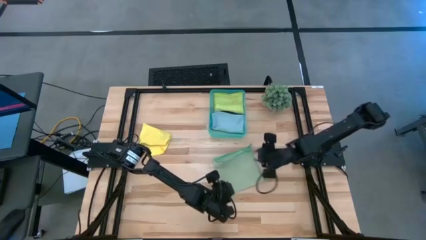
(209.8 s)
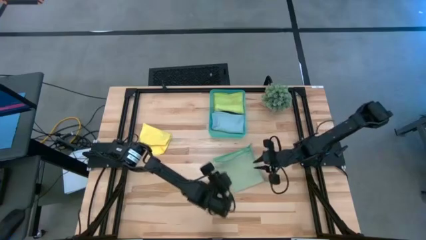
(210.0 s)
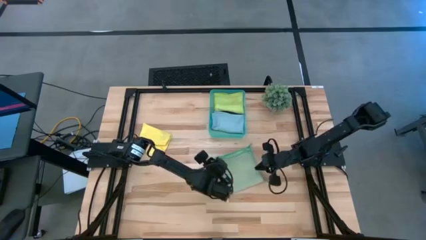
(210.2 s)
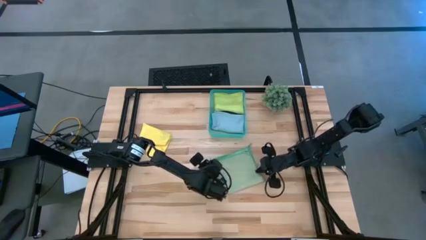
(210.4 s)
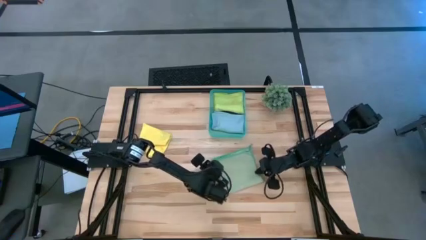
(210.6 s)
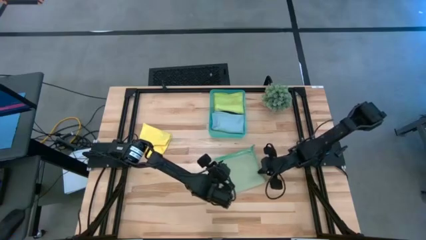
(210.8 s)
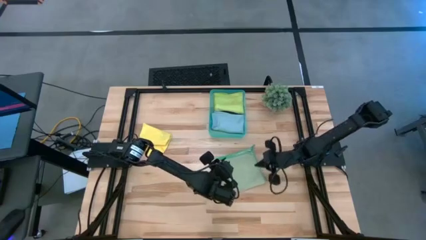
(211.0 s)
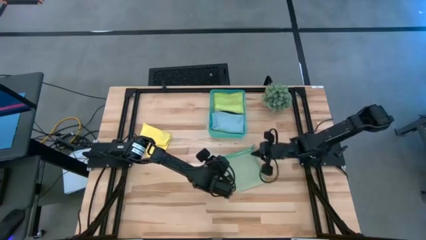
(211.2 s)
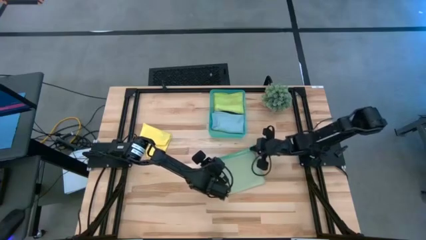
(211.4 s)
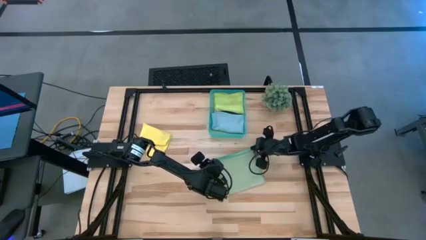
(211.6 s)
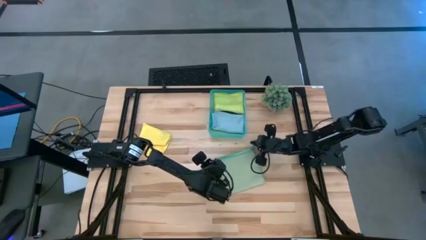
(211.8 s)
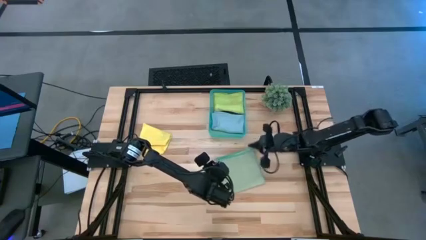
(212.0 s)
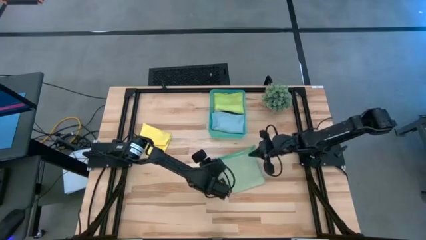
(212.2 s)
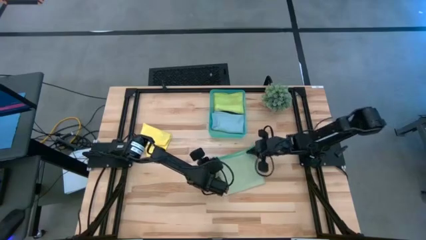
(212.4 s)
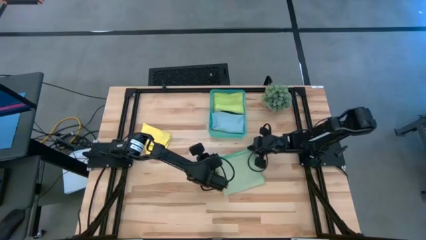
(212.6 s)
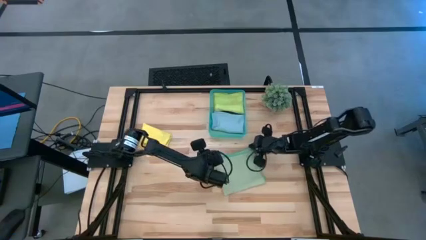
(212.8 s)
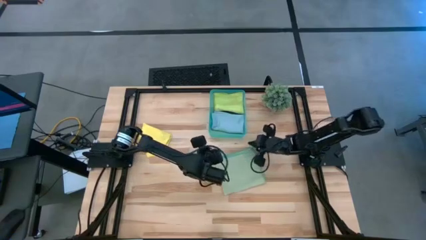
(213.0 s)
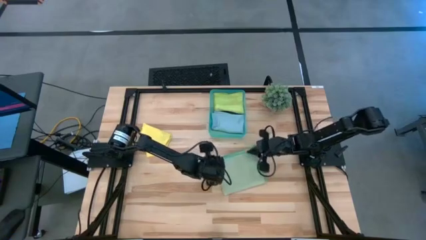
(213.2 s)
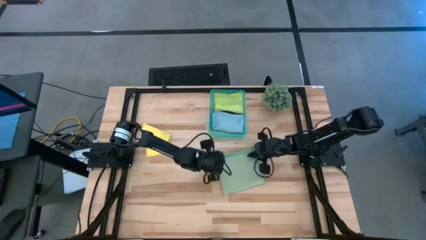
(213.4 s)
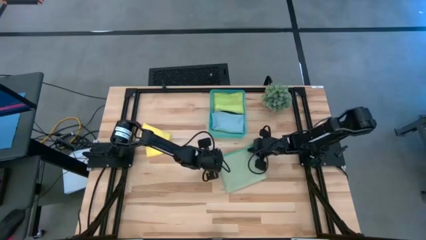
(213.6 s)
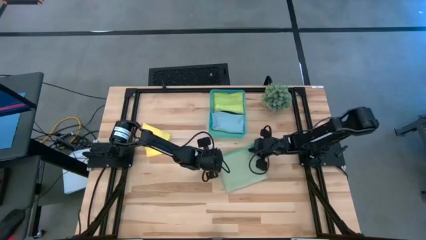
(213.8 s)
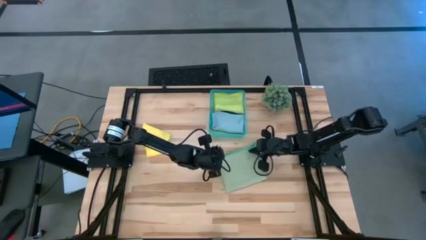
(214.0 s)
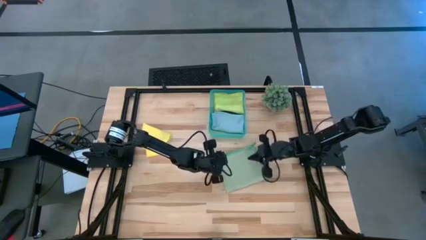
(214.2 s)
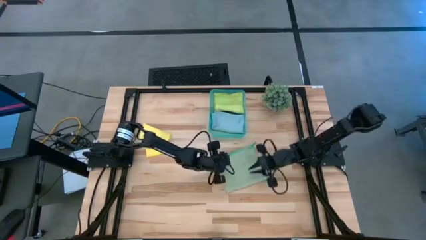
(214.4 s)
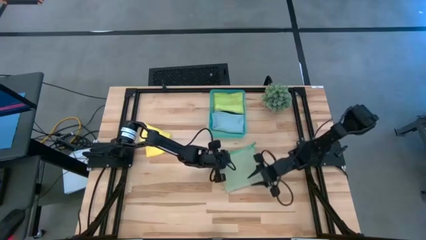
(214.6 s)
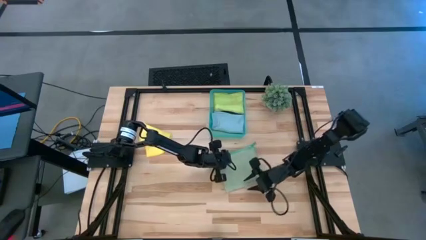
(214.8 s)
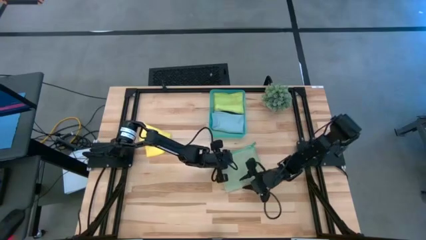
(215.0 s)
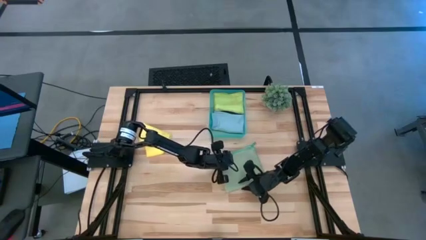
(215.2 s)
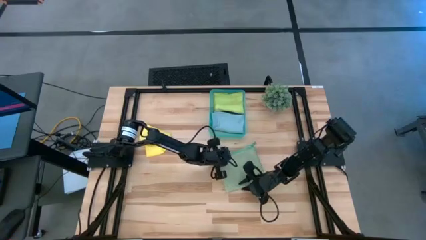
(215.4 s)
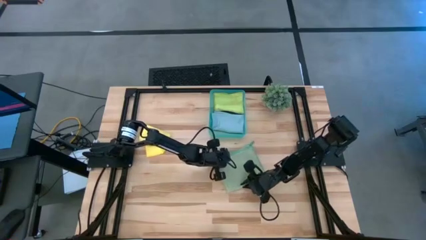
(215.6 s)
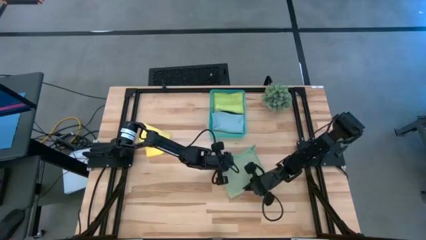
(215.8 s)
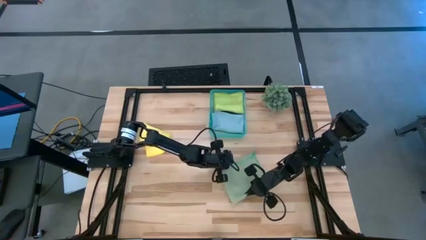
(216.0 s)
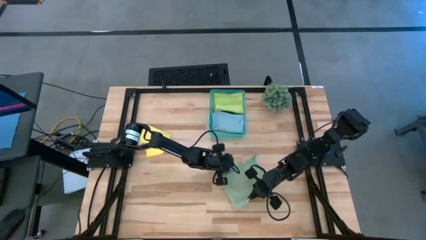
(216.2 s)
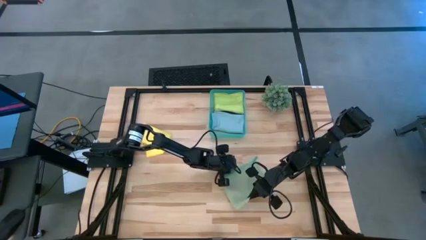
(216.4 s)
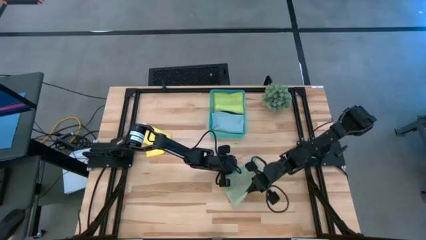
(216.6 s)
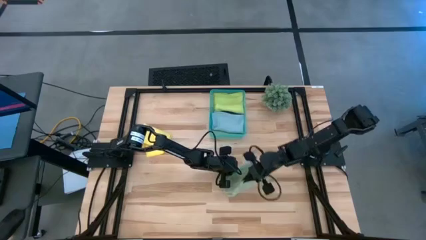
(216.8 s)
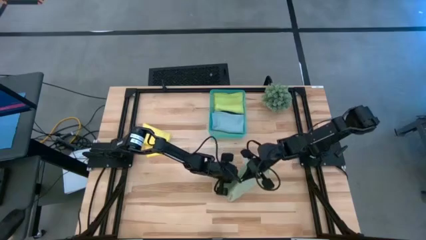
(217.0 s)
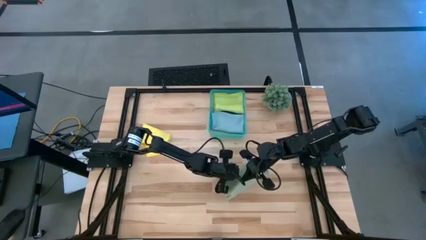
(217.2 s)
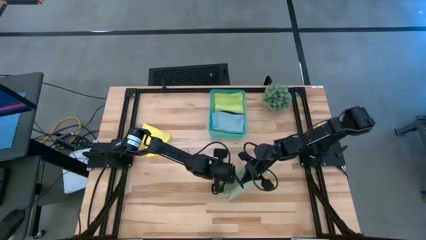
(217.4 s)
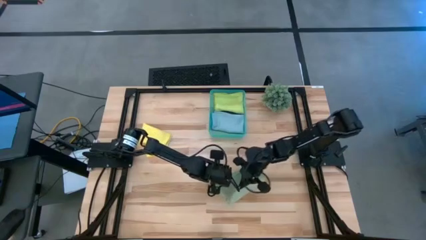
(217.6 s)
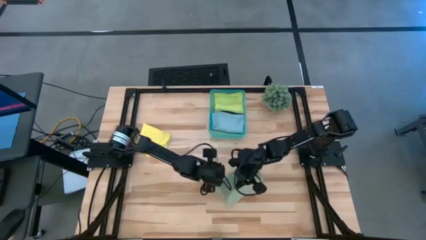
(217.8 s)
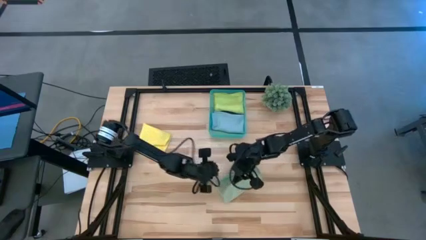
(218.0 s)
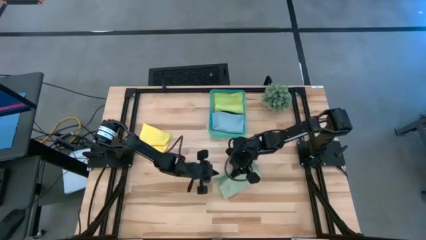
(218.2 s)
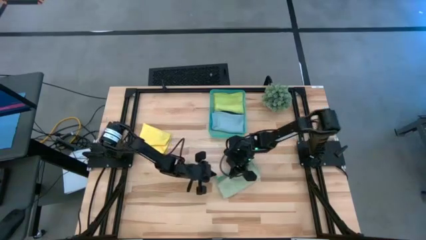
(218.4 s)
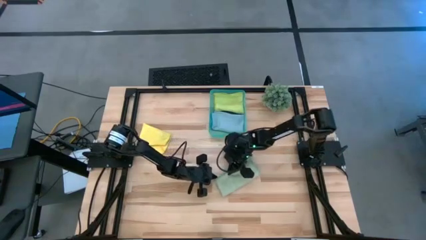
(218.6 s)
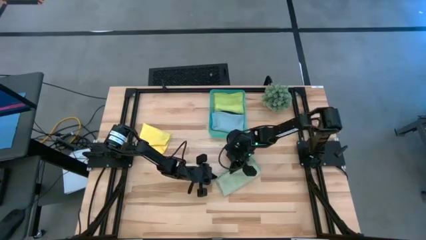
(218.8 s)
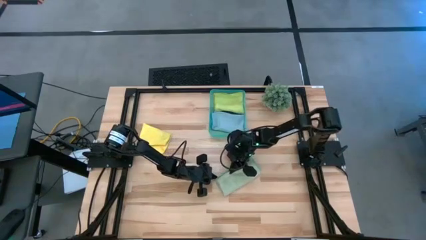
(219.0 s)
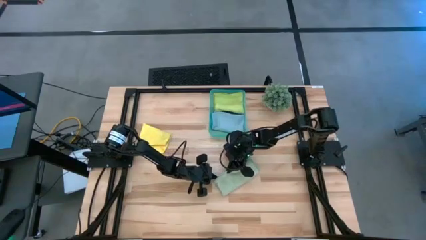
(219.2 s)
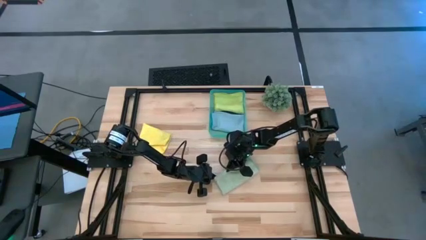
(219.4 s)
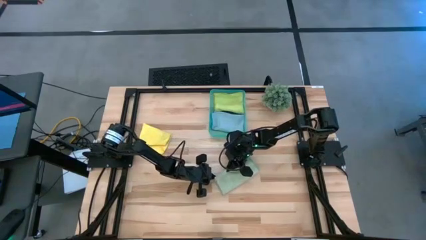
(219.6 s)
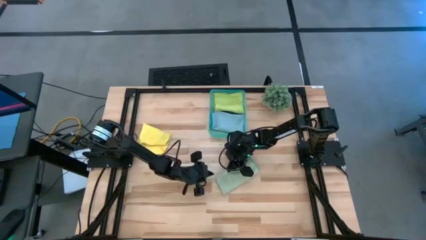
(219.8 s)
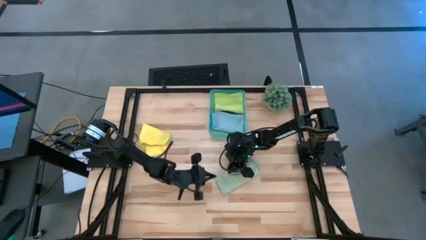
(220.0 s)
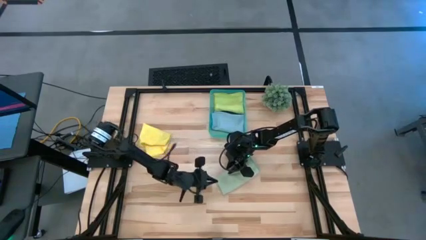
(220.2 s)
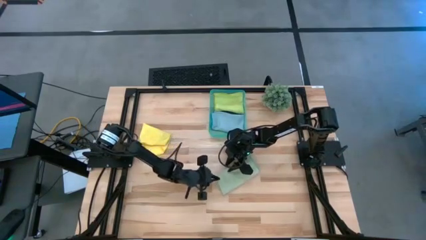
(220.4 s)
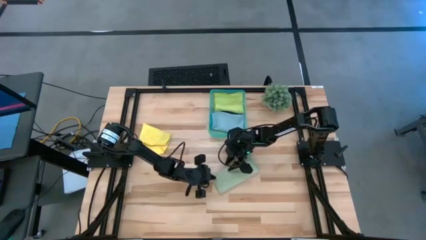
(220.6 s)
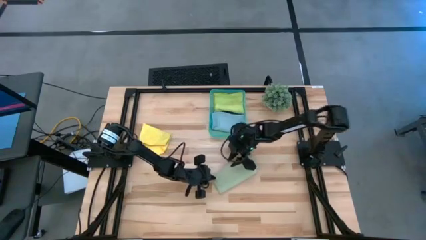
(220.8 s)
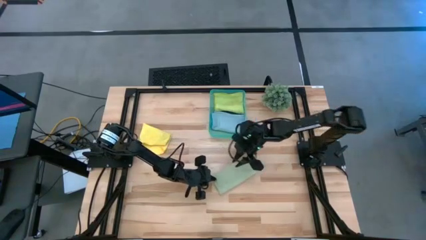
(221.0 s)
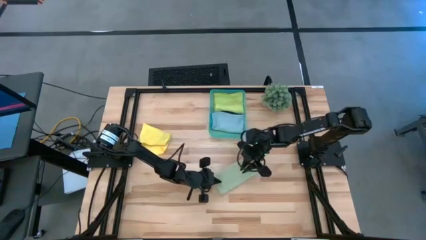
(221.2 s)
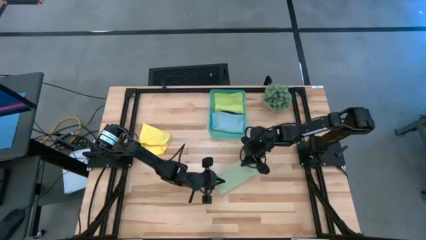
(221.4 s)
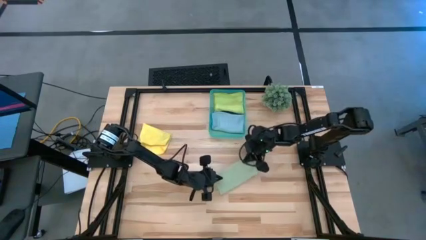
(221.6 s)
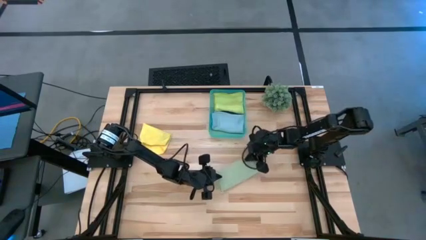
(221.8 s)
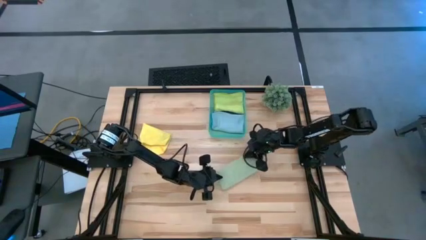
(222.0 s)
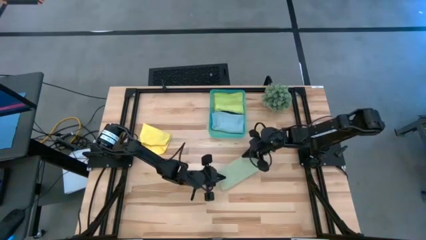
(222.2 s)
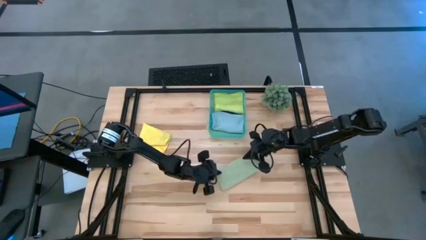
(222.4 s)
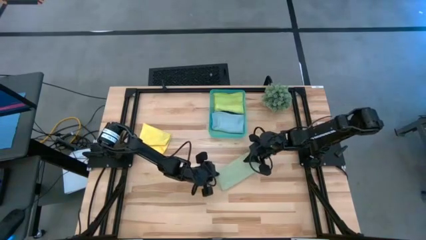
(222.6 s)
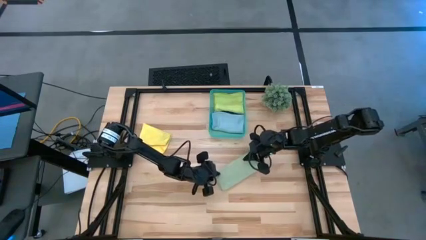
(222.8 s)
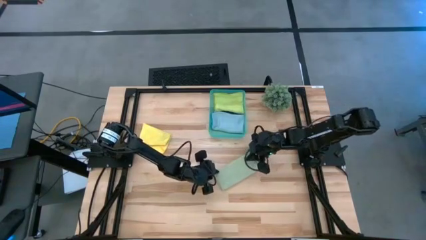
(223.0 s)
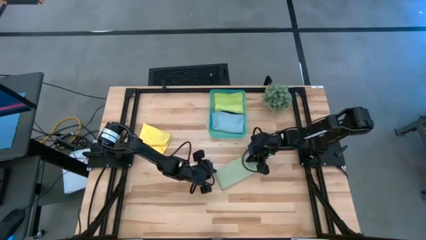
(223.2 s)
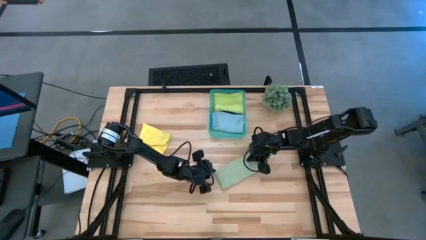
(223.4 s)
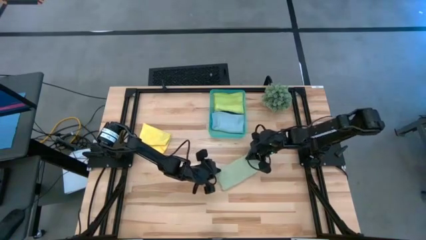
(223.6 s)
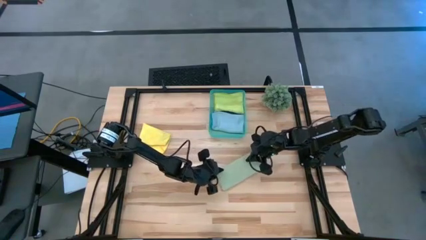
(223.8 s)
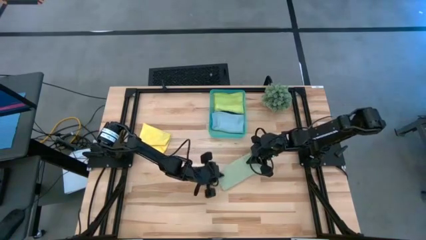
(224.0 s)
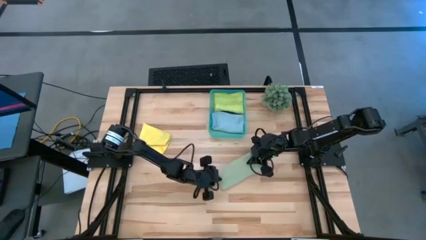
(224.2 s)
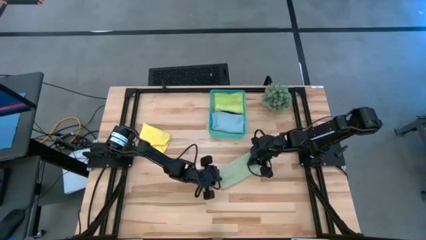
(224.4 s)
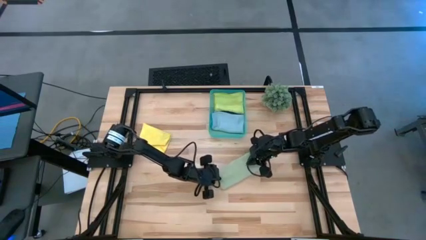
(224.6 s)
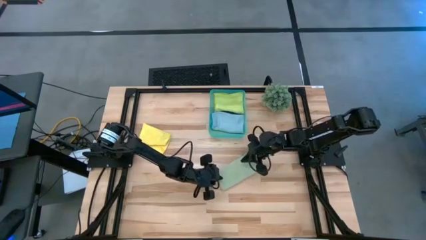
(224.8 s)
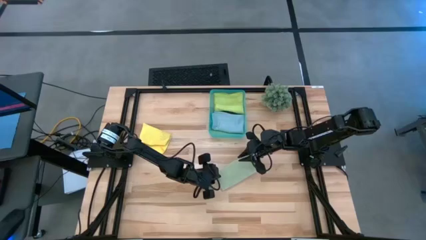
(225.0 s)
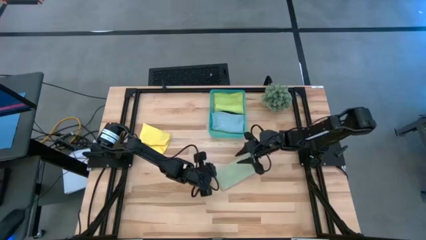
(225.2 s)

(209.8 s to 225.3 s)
Task: Fold microfiber towels
Fold the green microfiber cloth
